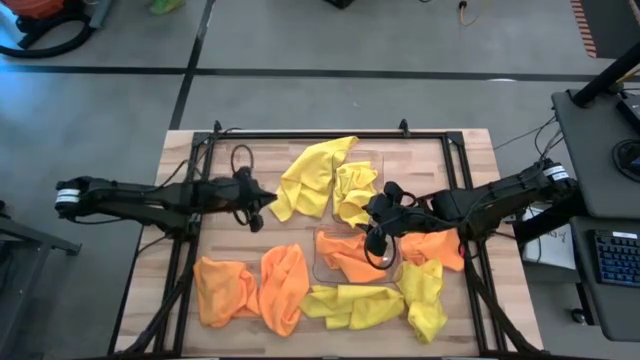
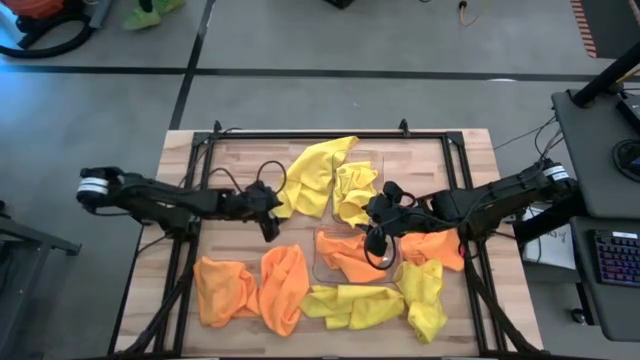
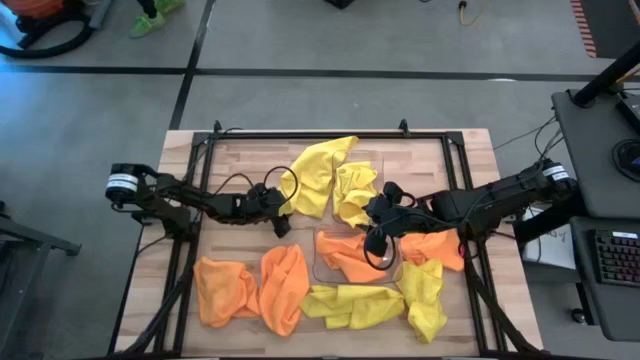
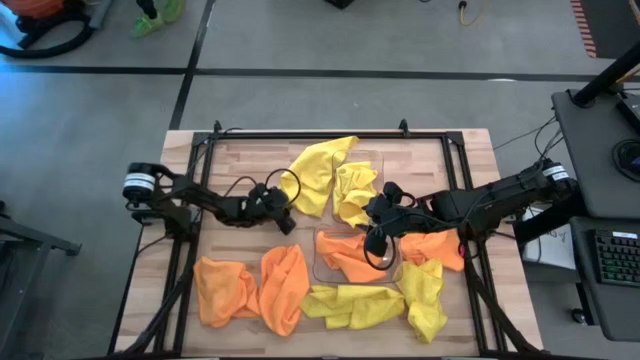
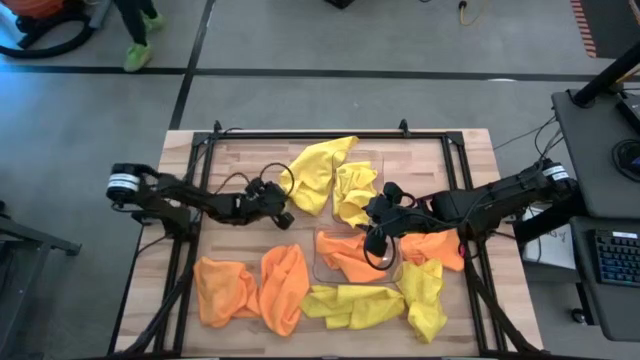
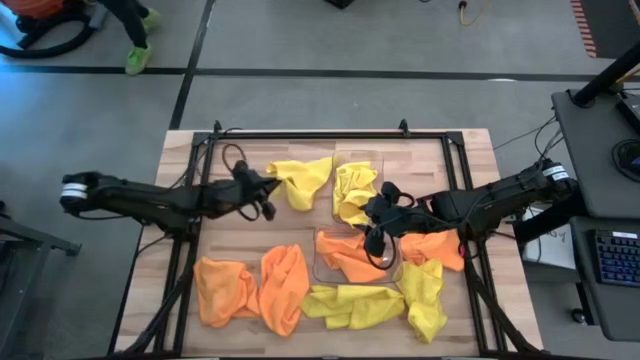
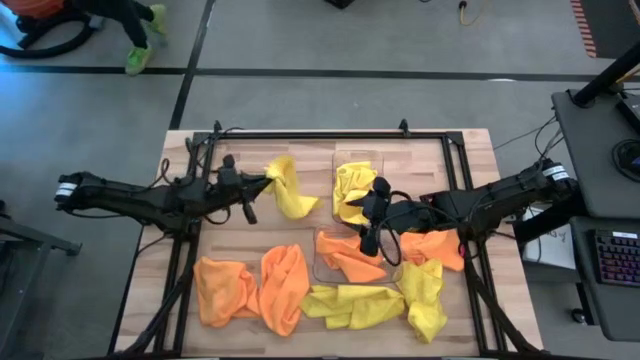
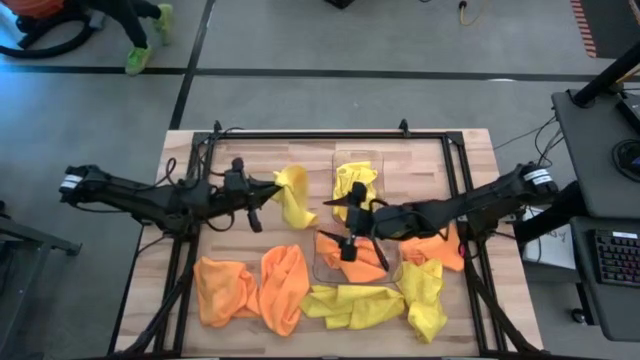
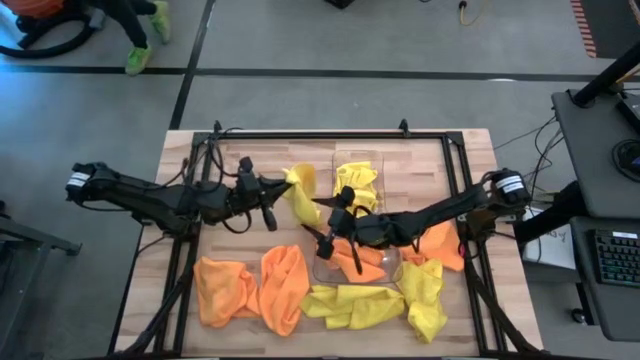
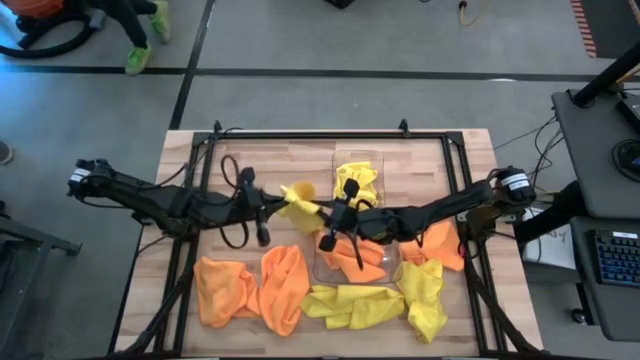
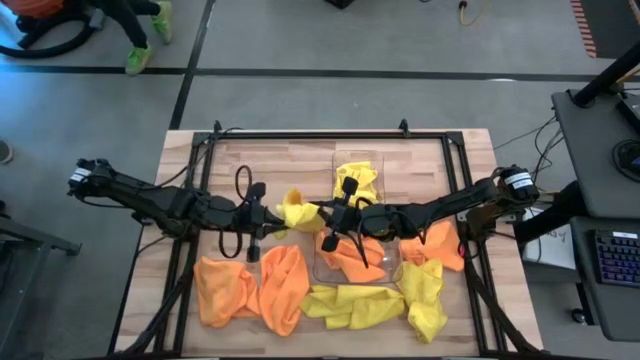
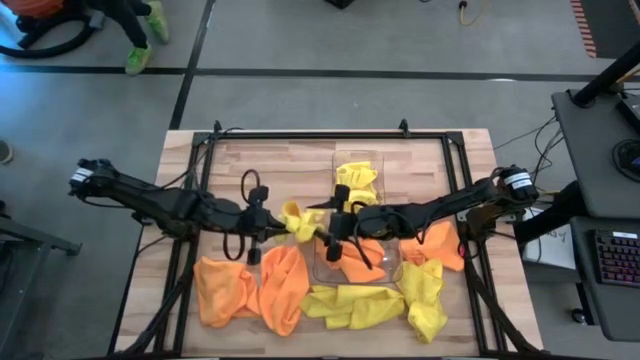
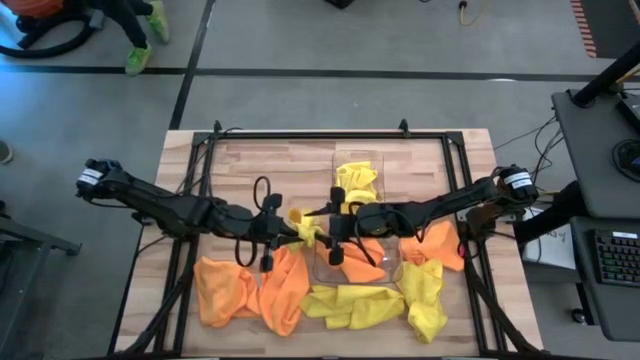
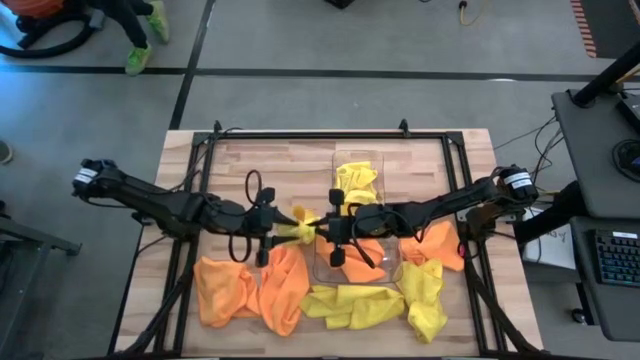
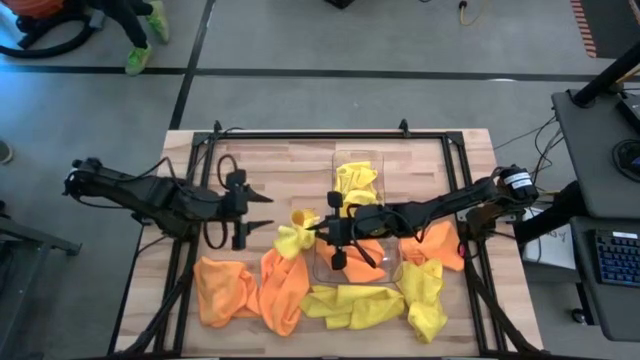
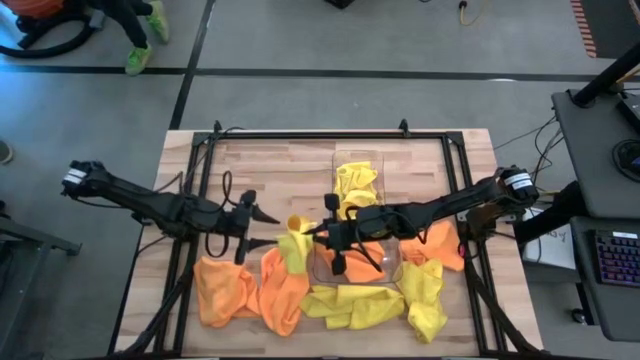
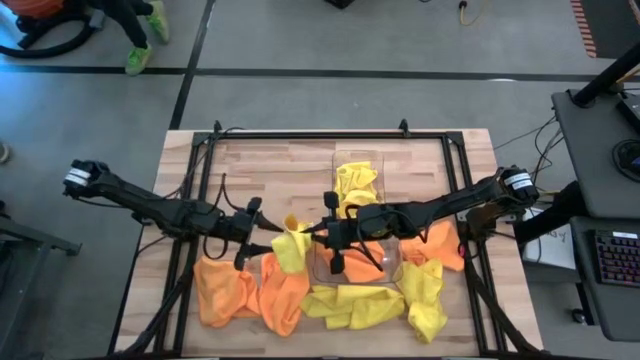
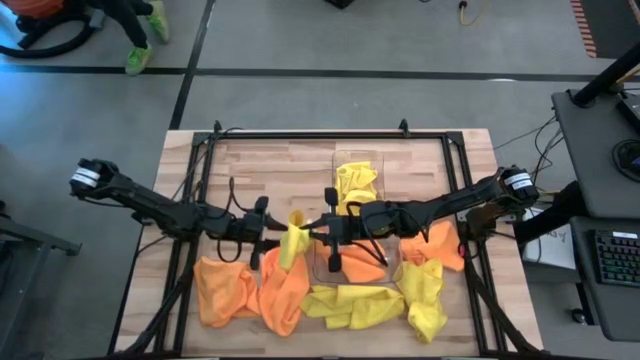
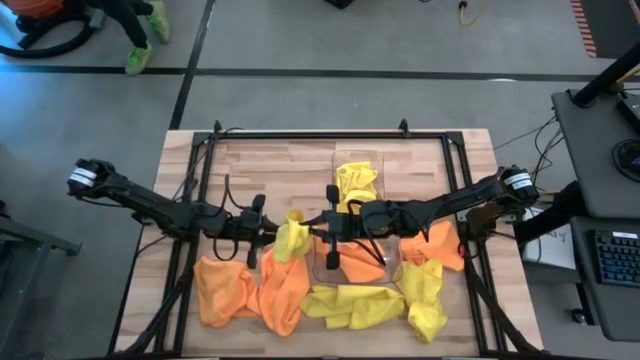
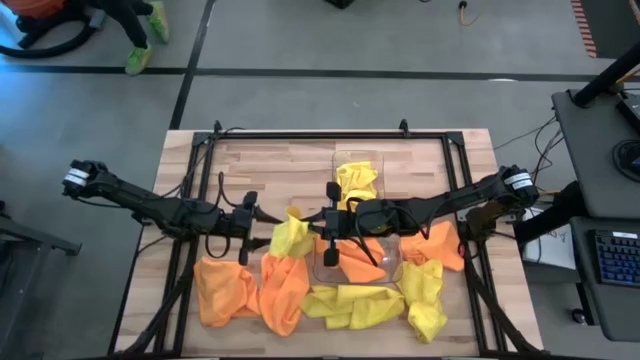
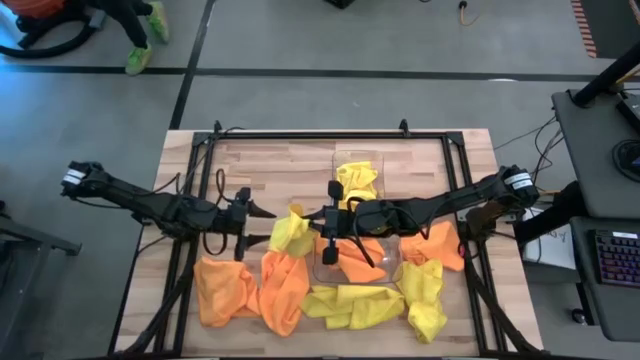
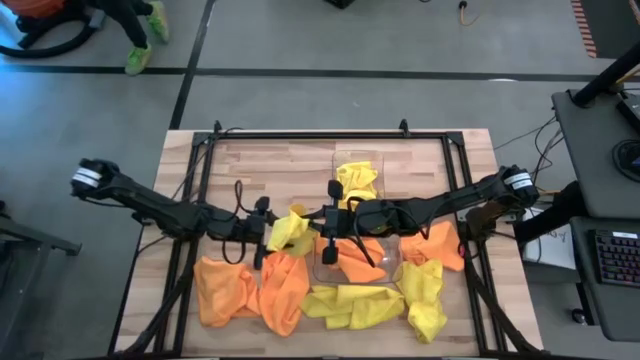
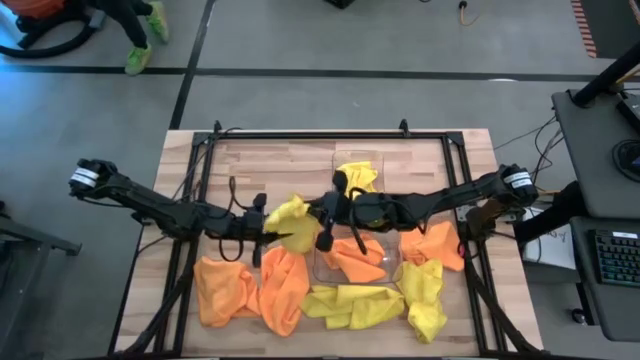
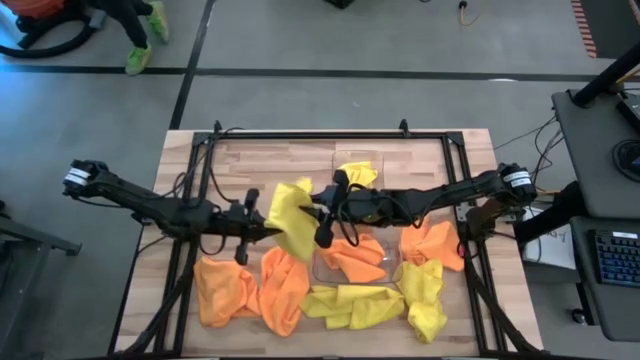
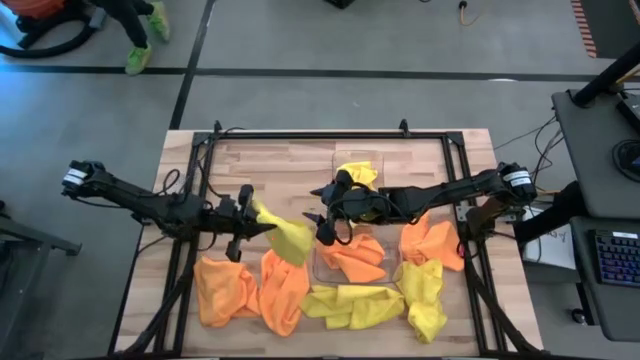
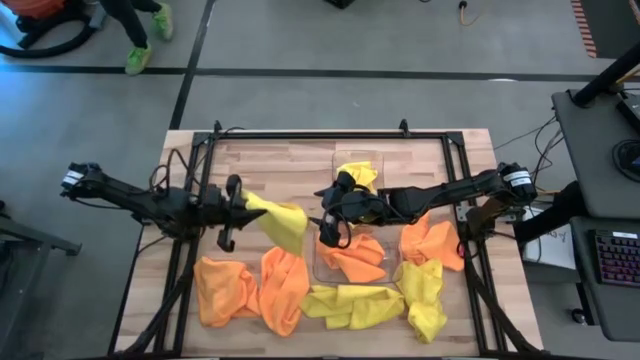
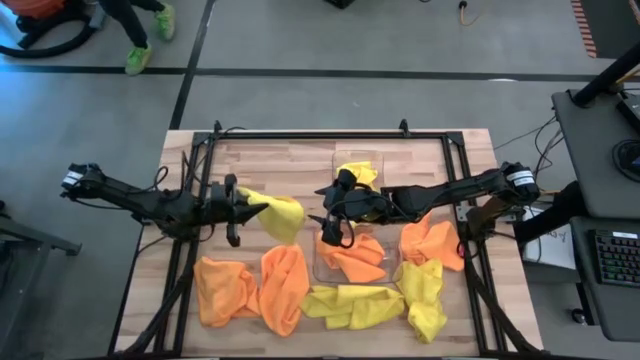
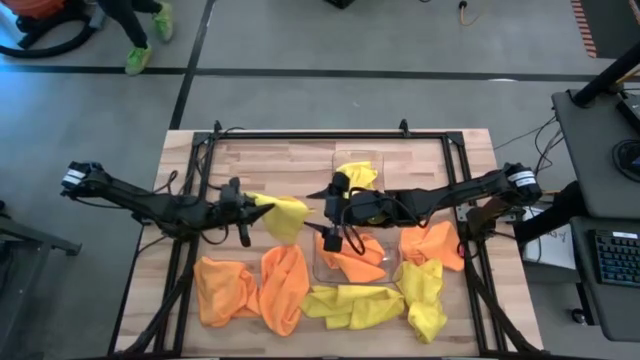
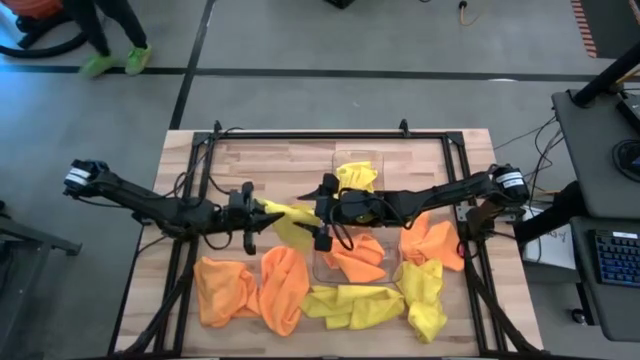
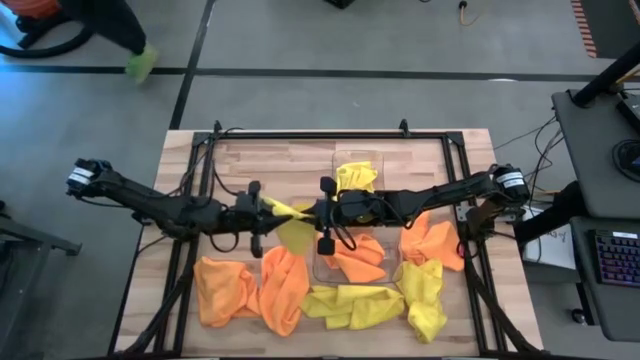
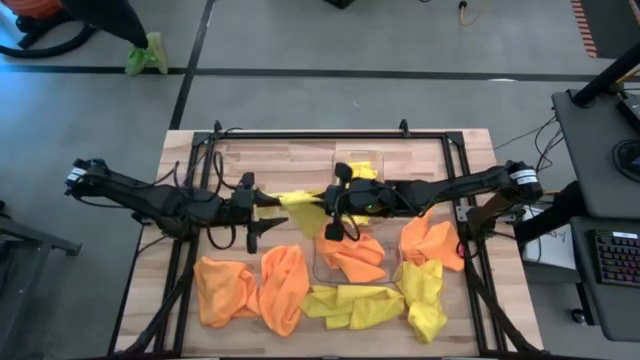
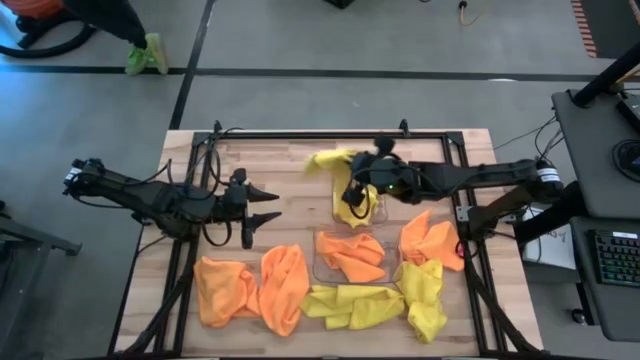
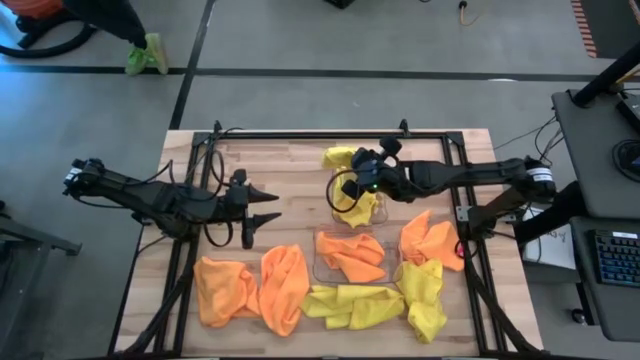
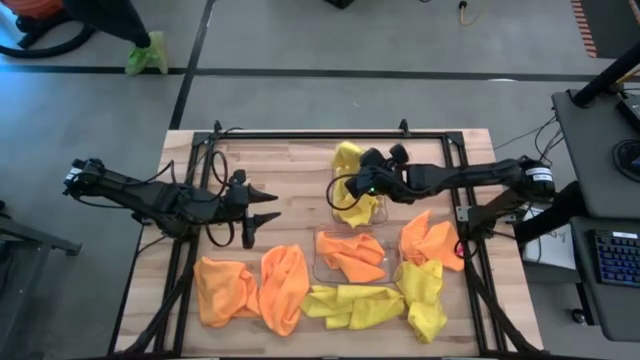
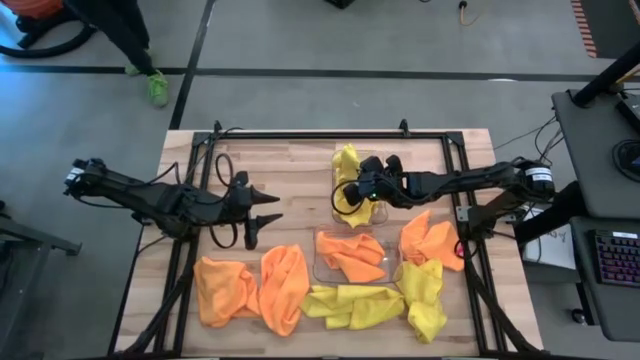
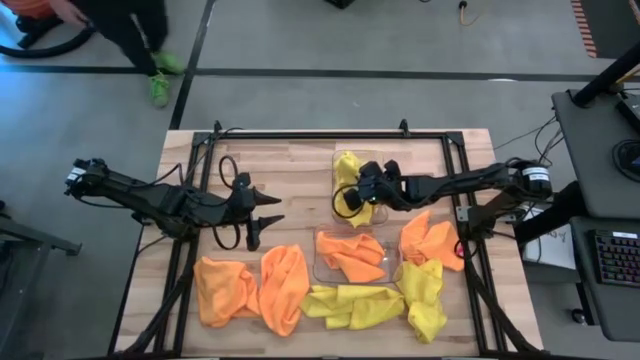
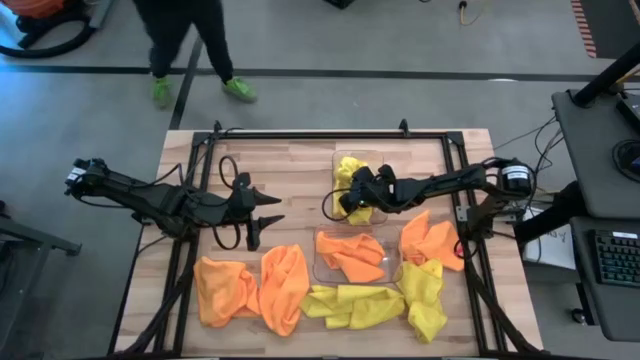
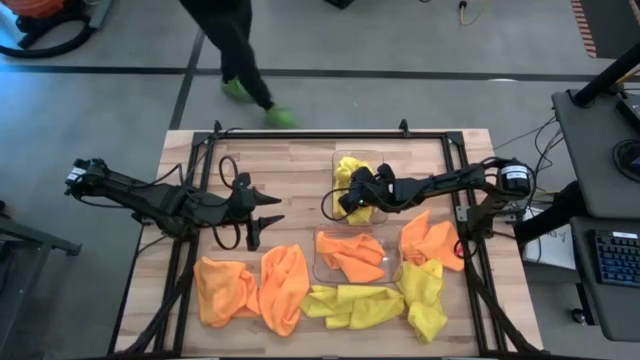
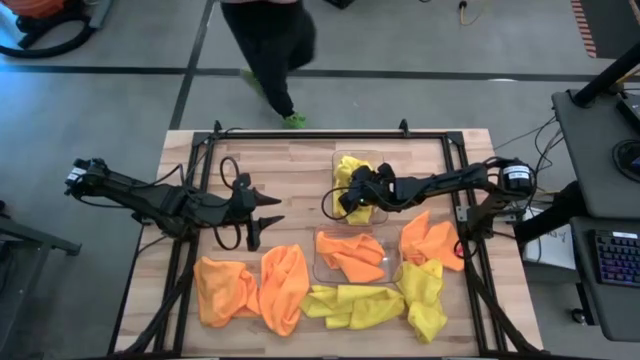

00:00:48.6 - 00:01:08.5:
Task: Sort microfiber towel by color & place in baskets
Put the yellow towel into the top transparent bin

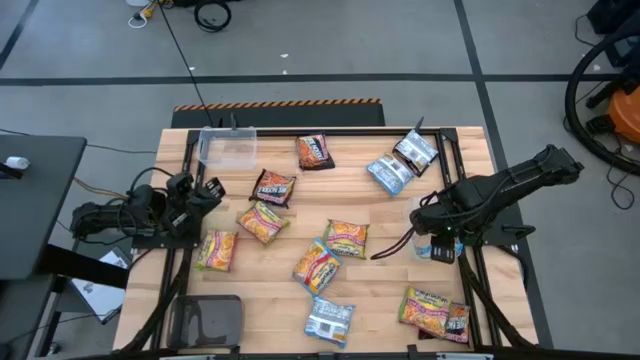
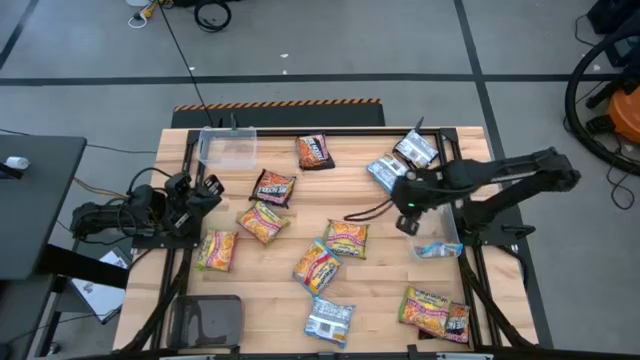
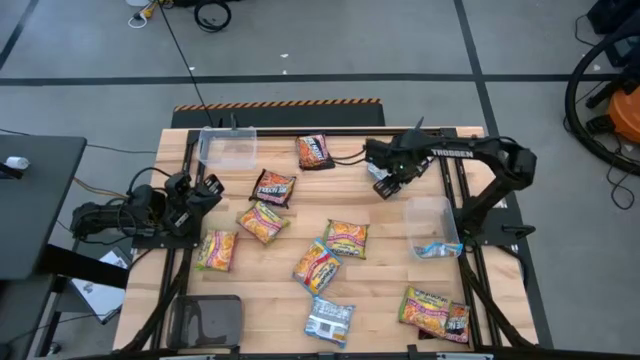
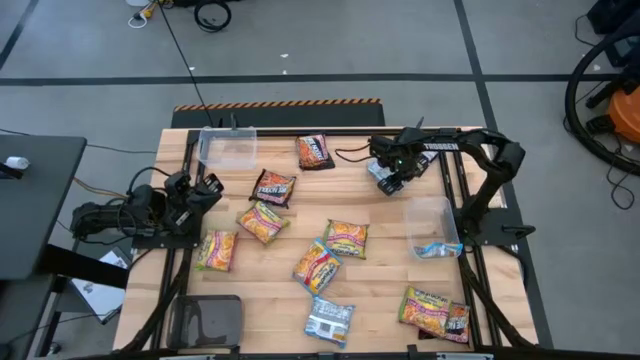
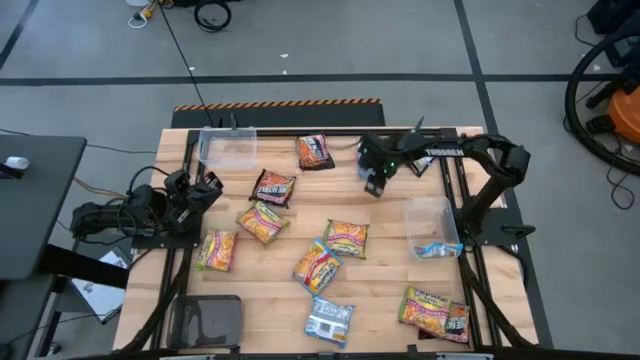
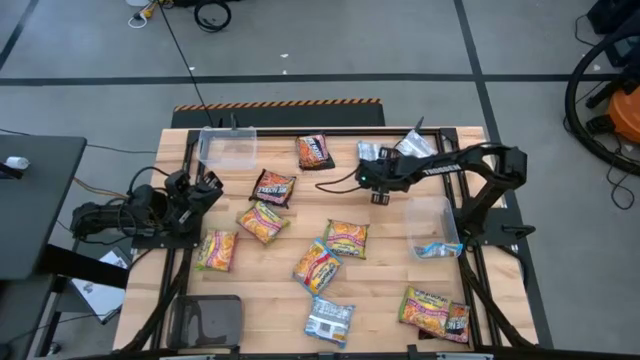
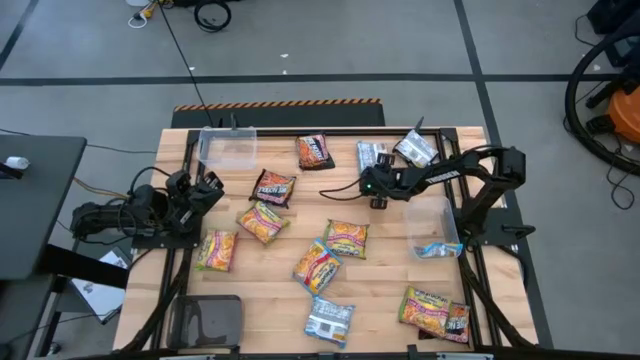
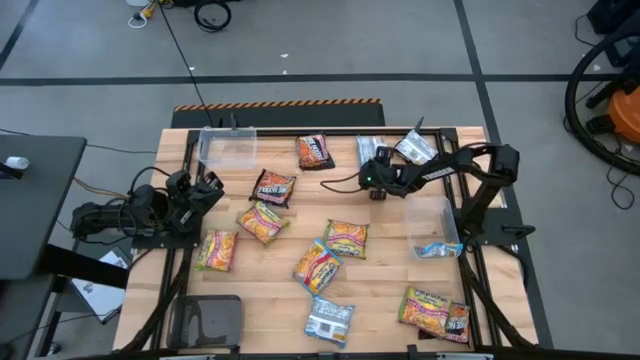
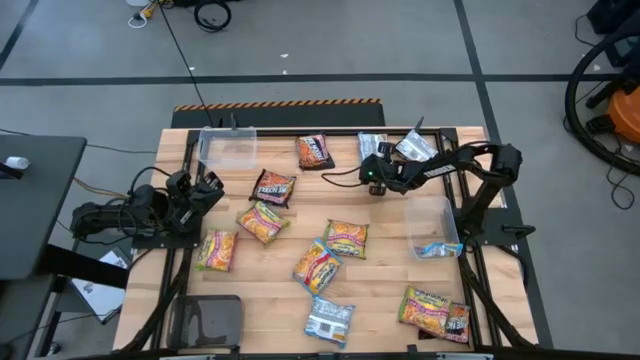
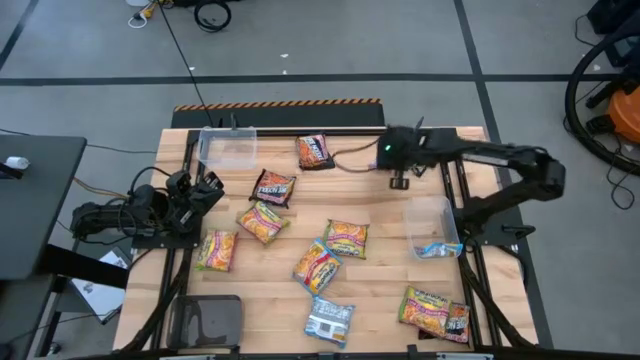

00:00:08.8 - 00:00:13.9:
Task: Sort Maruchan noodles
Put the blue noodle pack into the bottom transparent bin
